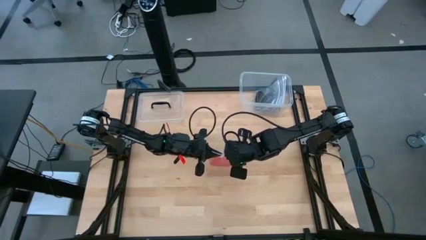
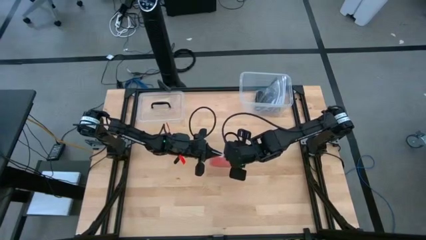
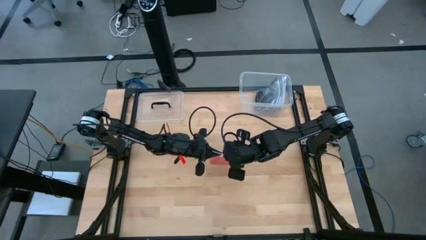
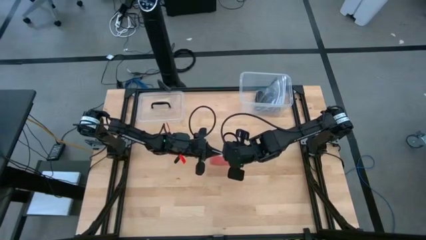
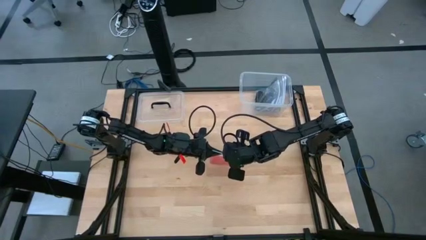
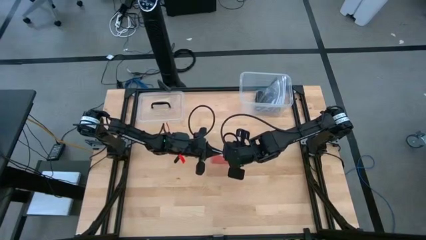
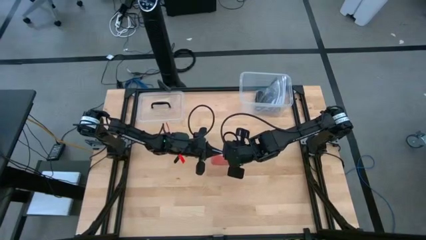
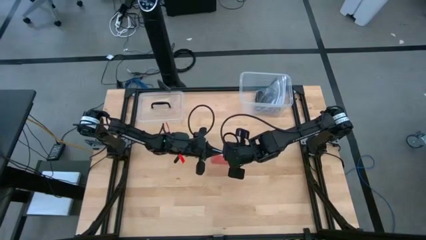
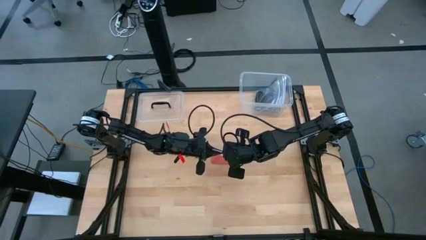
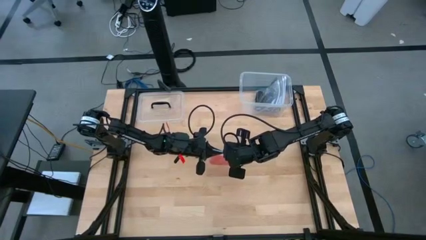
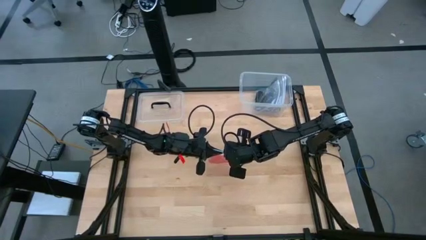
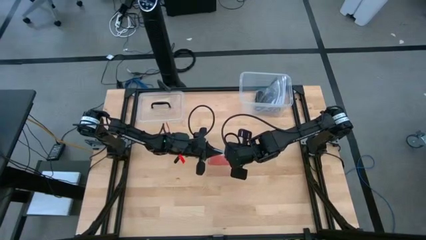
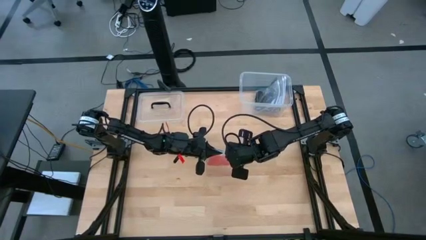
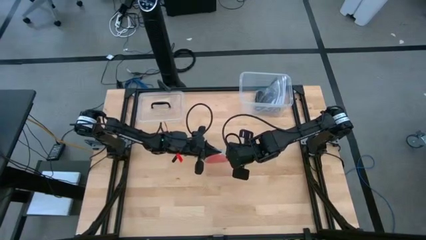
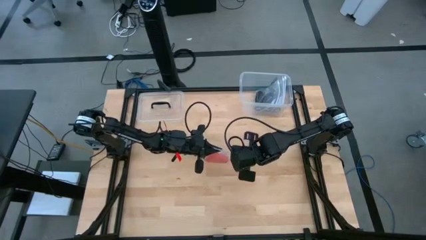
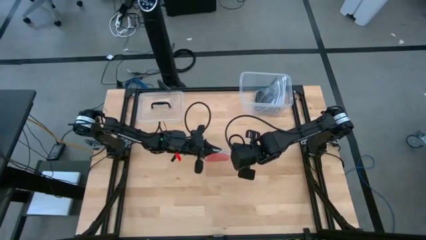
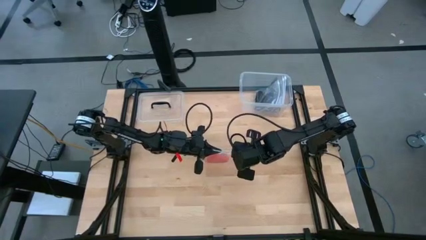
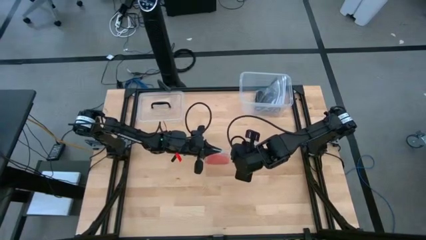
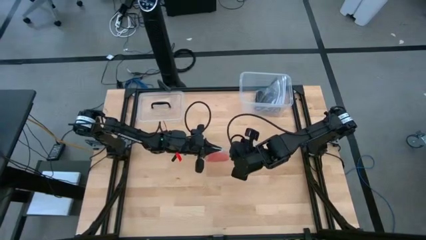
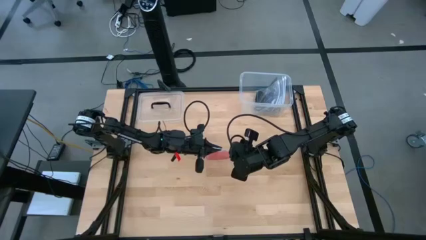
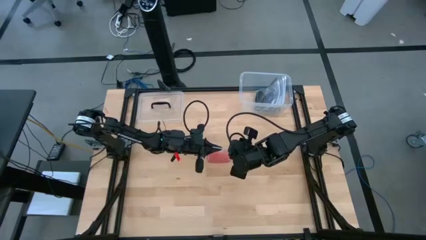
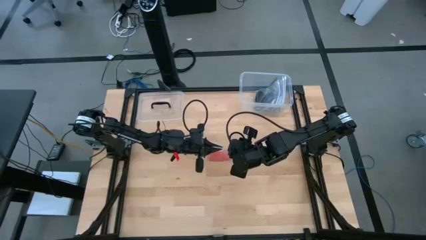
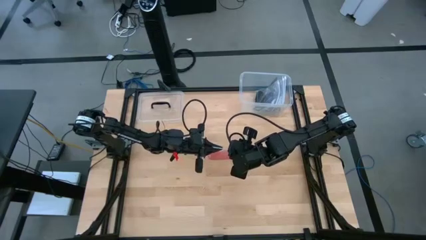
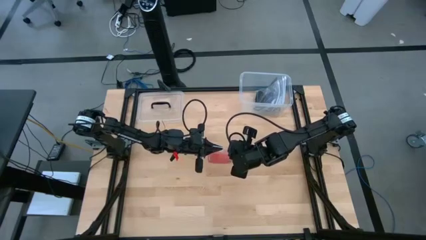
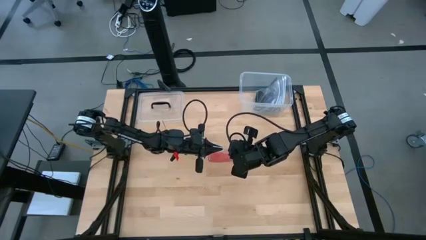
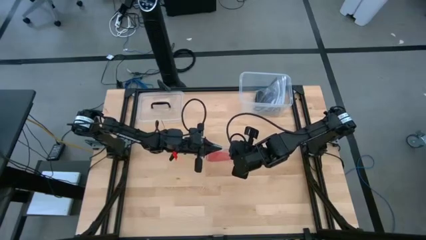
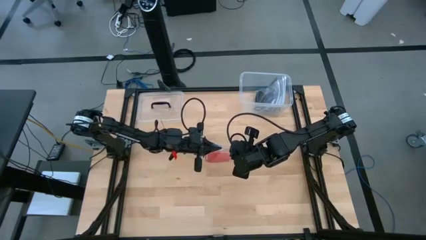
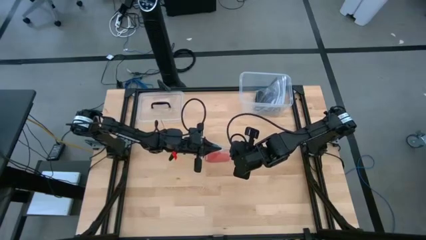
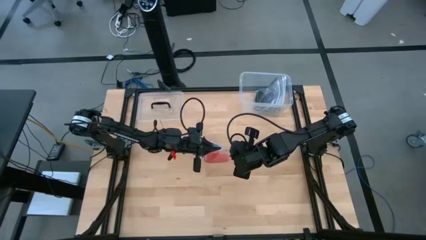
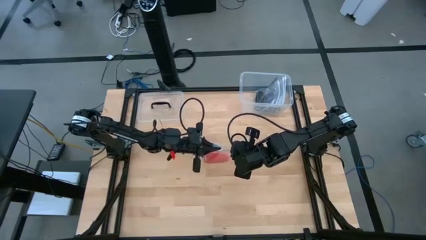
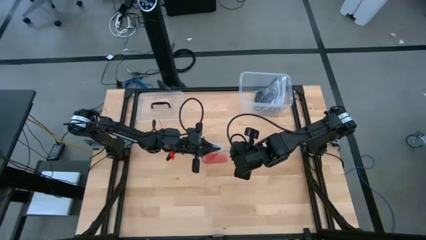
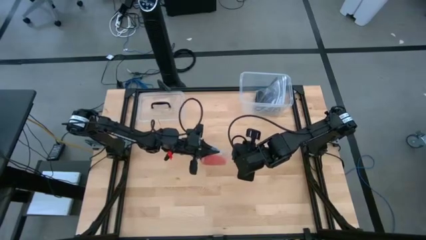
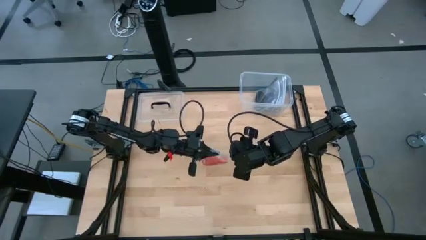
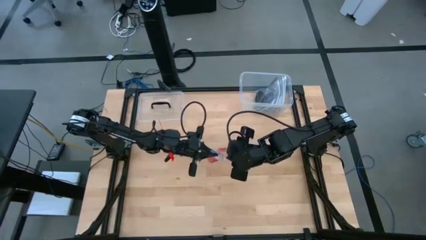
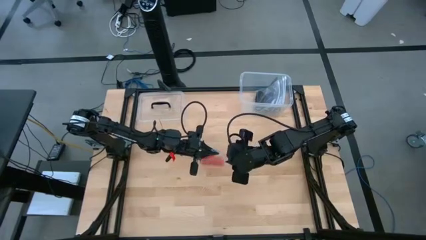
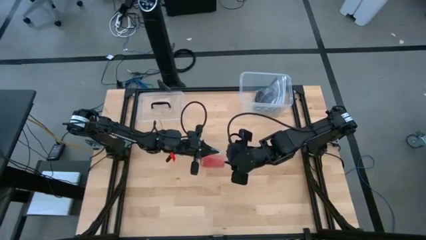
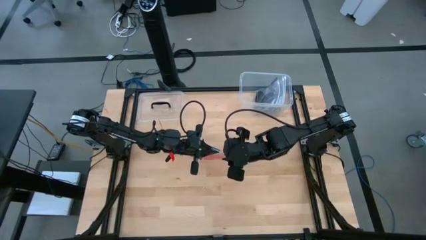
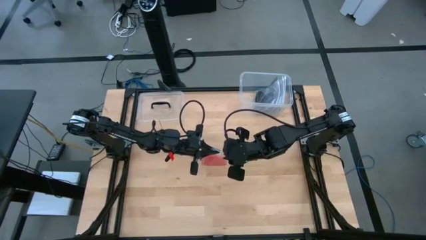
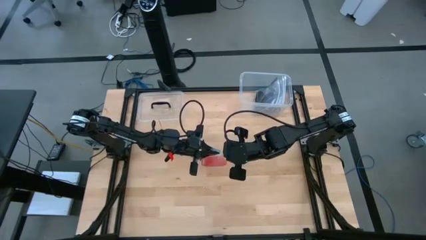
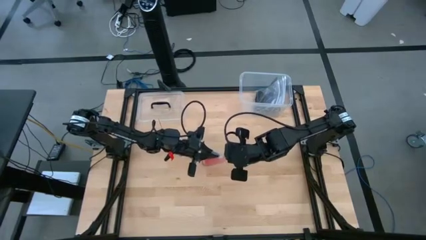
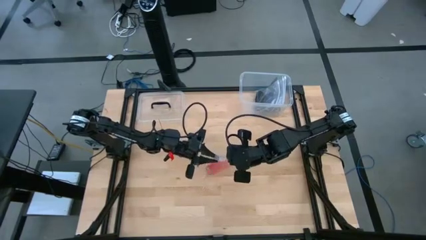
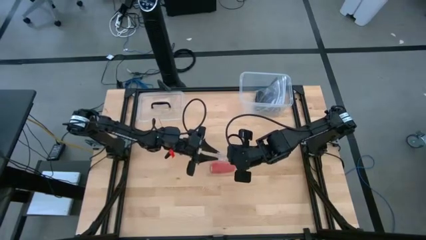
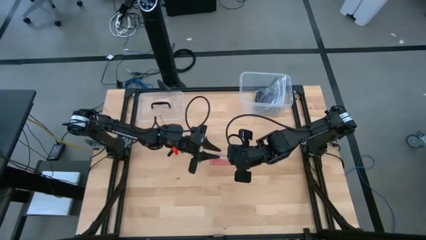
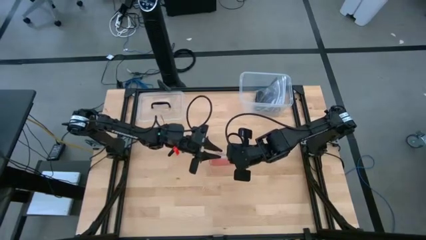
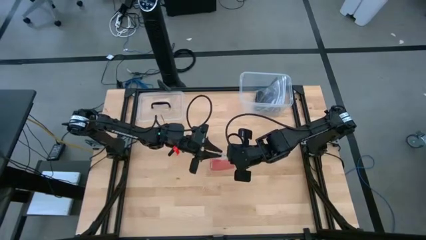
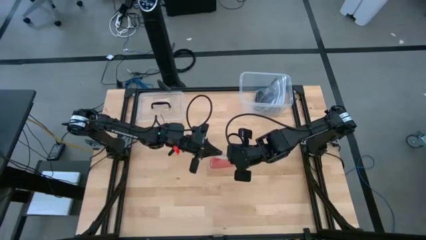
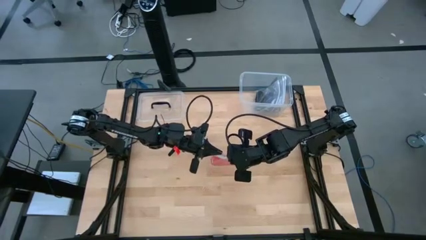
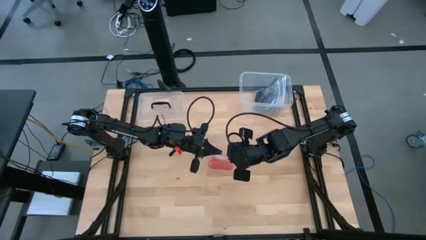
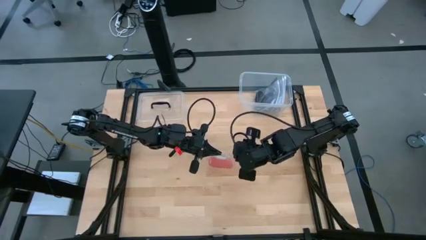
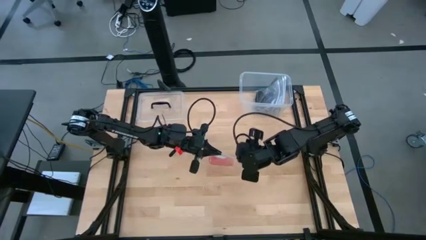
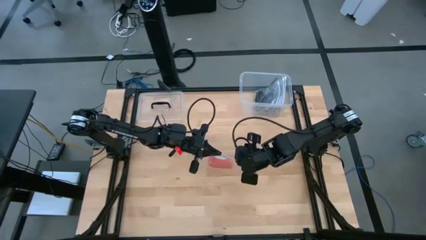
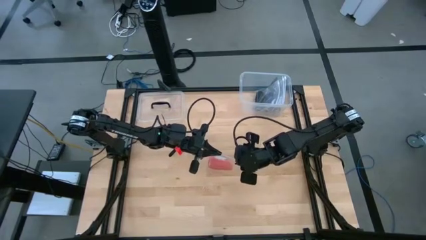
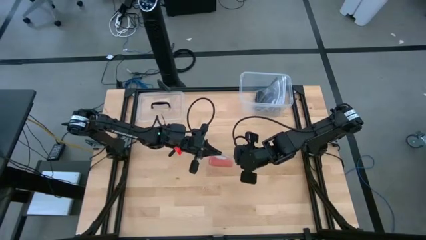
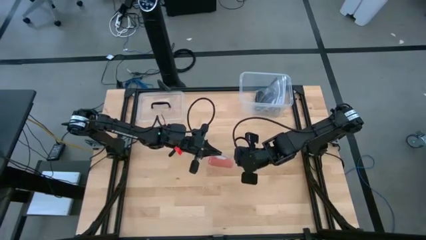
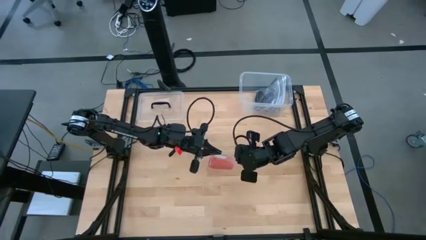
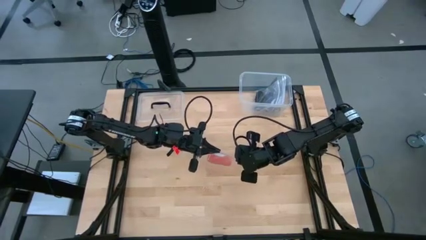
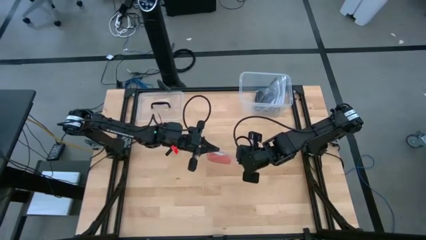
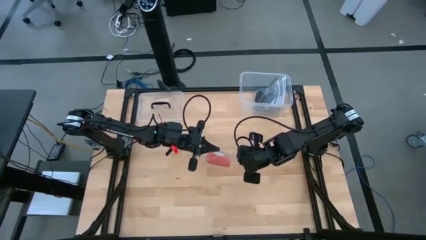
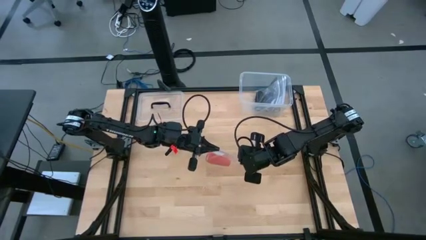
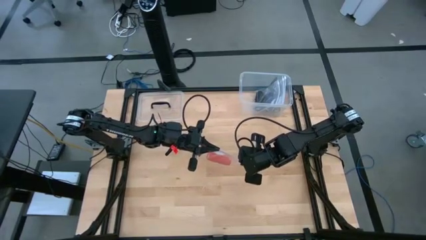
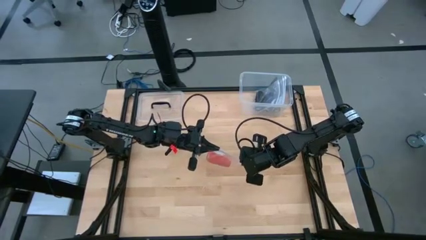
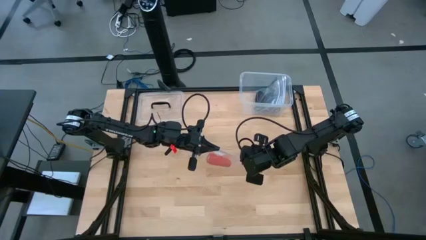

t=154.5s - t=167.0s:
Task: Roll bandage
Close the transparent zip bag

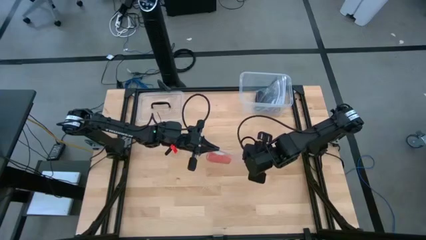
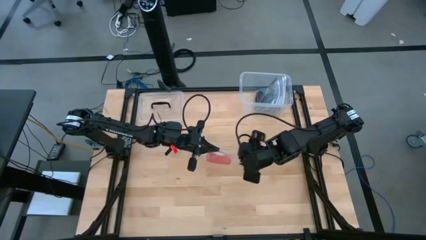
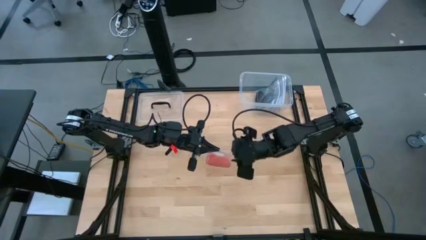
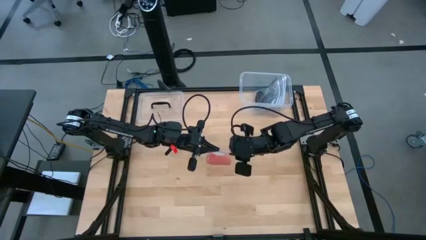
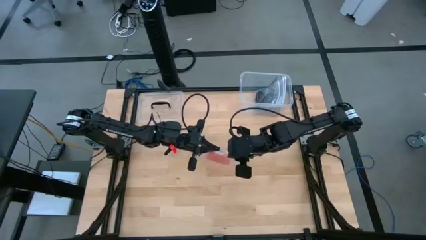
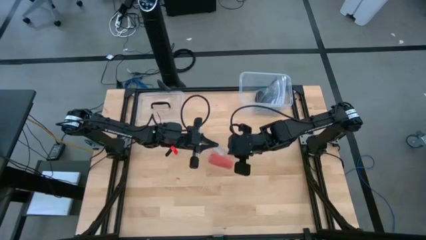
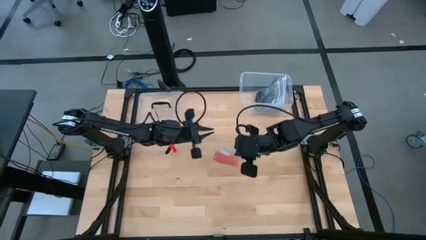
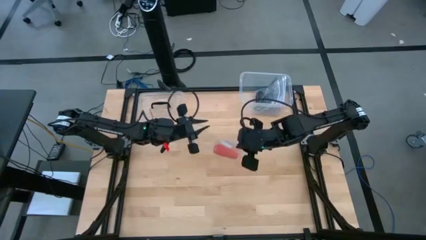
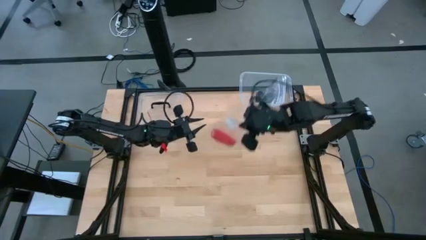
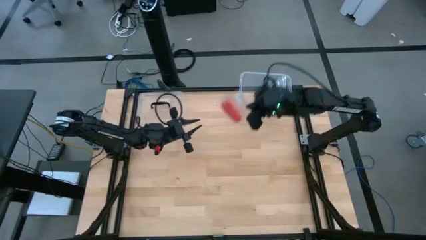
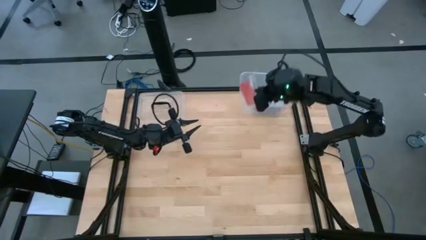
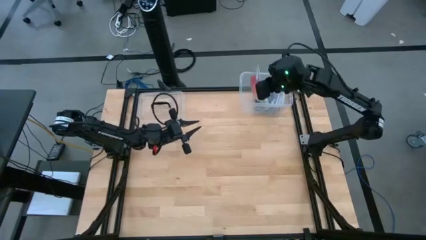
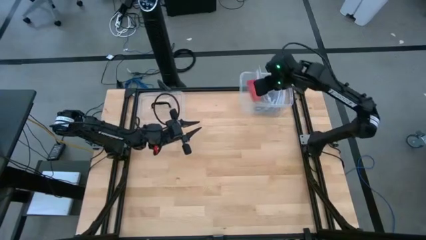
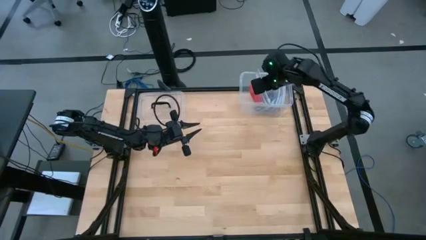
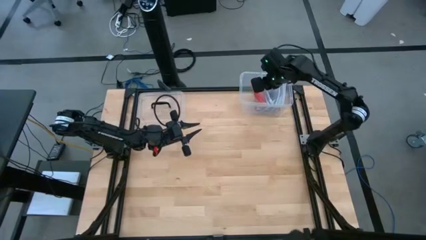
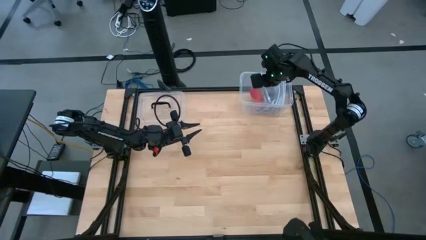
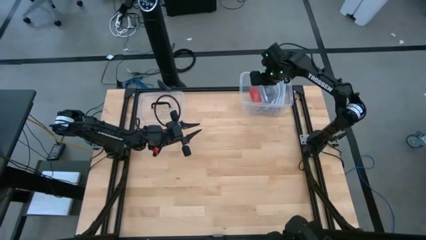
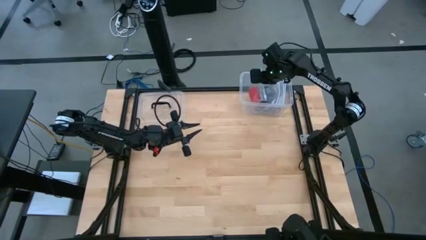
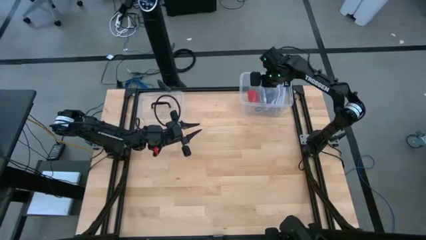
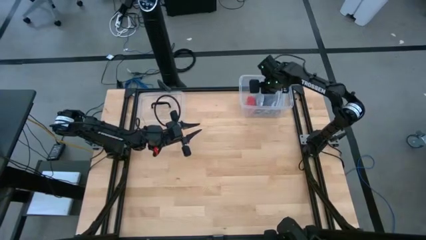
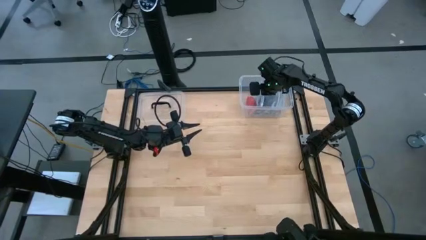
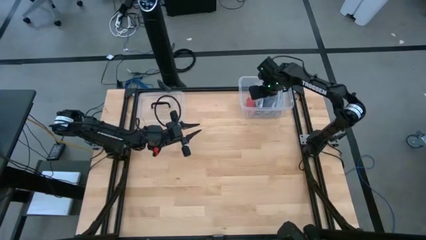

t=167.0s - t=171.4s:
Put the transparent zip bag with the red bandage into the transparent bin
